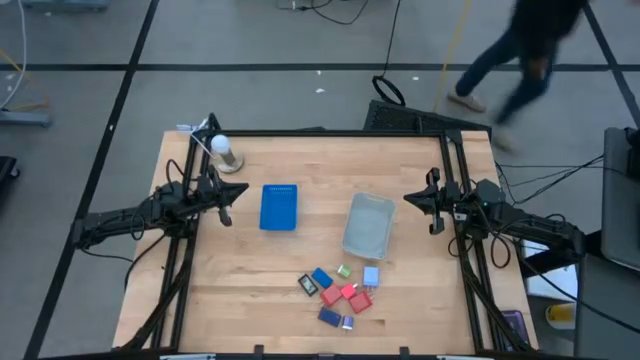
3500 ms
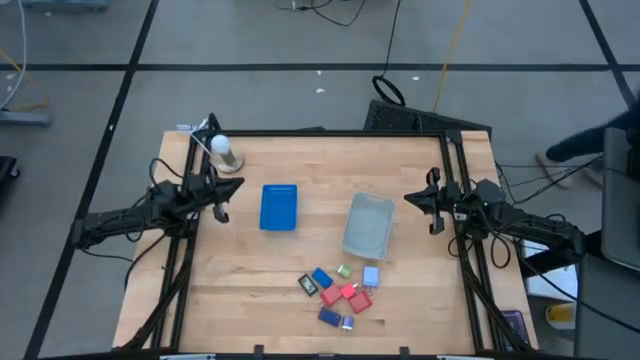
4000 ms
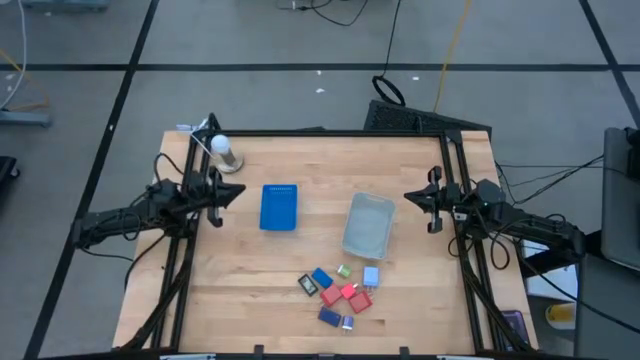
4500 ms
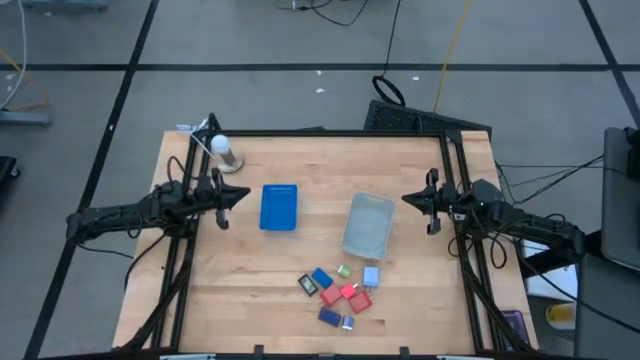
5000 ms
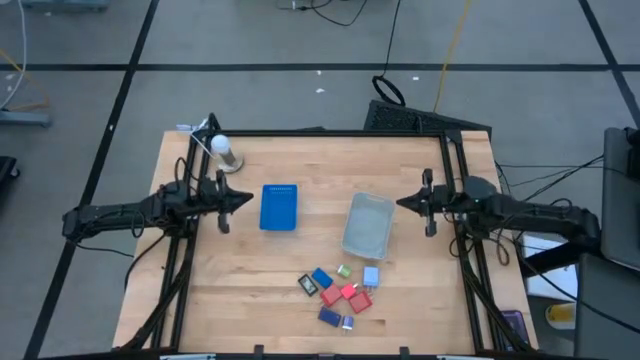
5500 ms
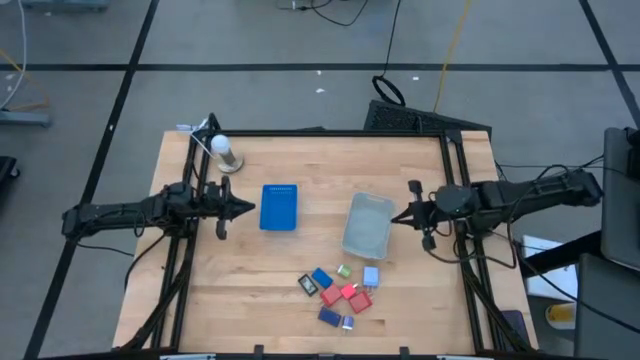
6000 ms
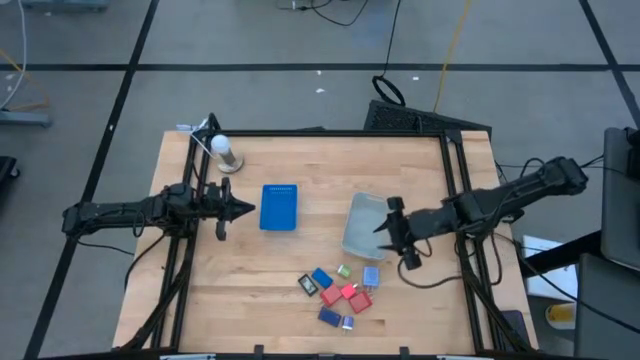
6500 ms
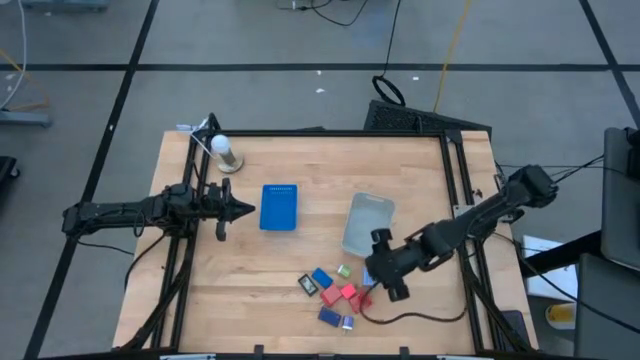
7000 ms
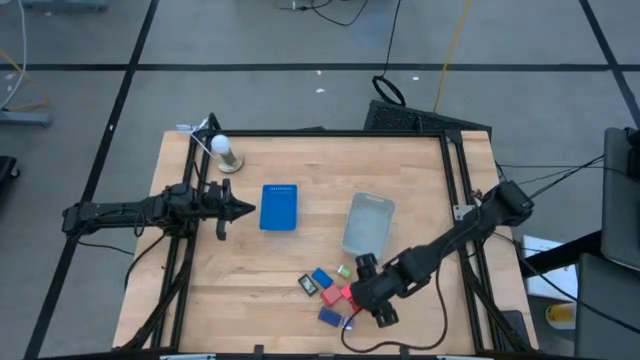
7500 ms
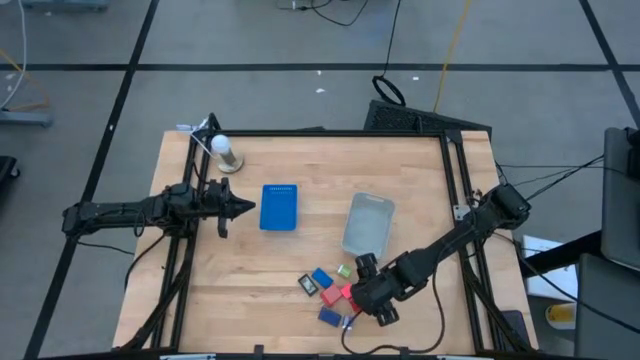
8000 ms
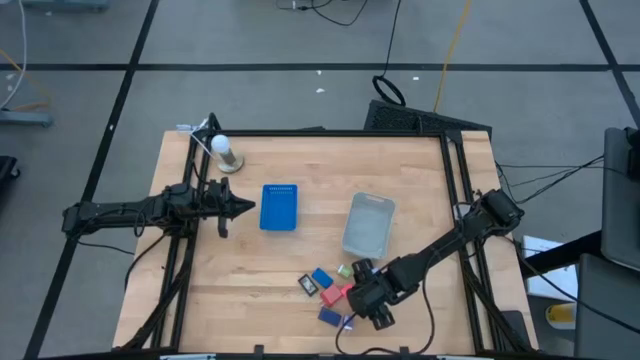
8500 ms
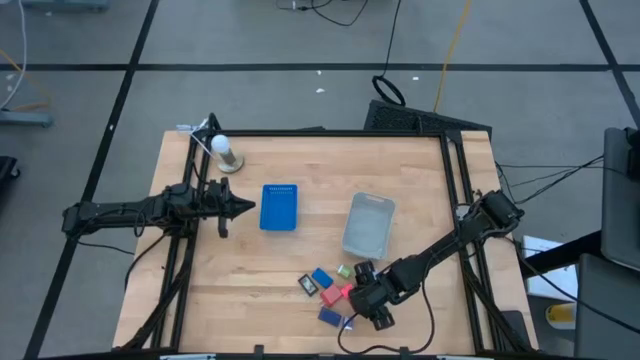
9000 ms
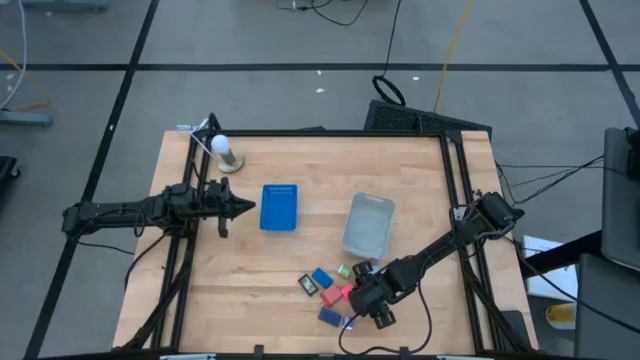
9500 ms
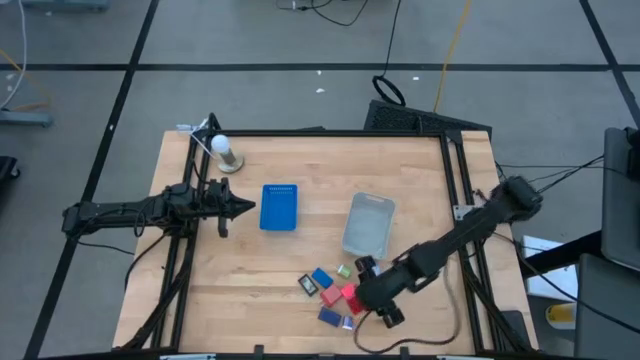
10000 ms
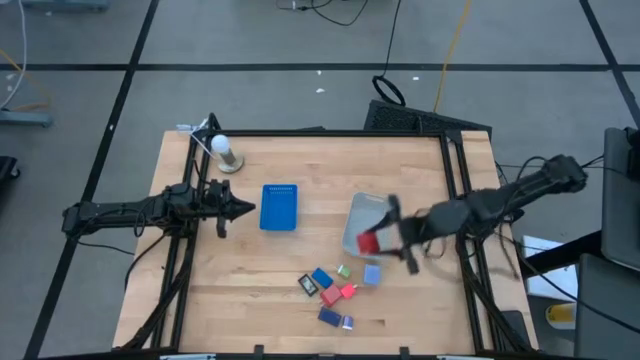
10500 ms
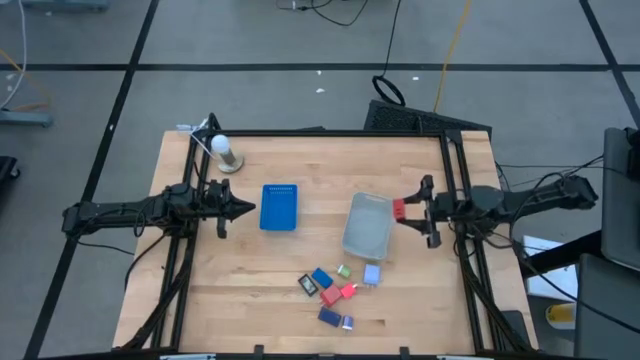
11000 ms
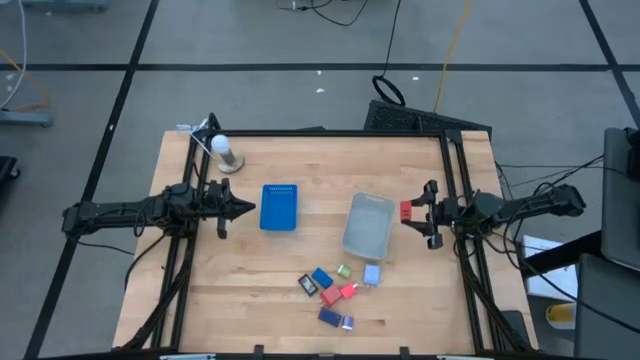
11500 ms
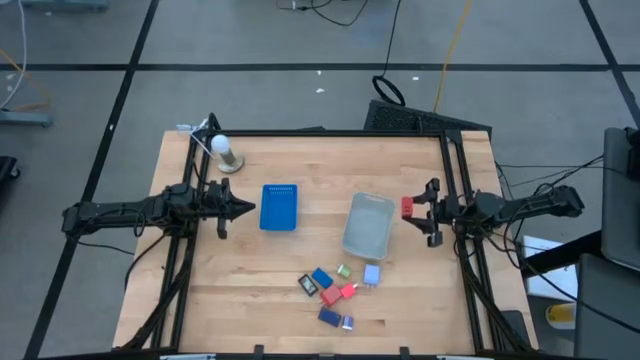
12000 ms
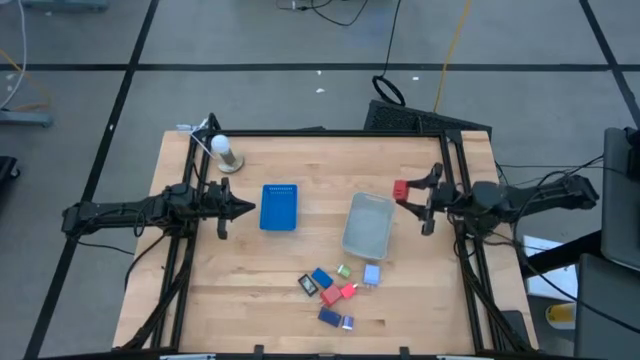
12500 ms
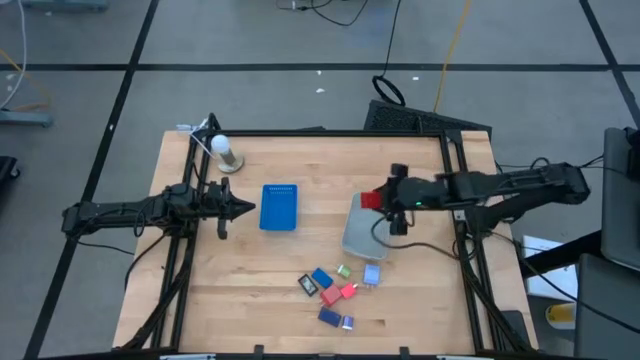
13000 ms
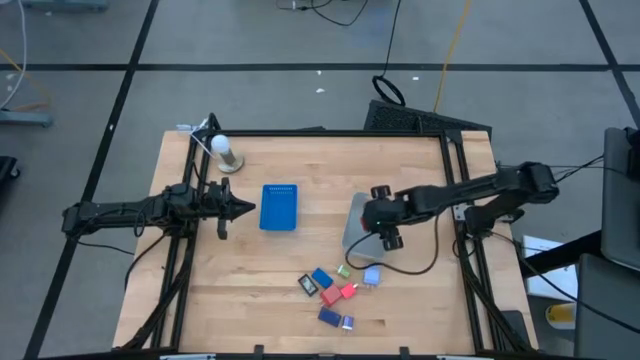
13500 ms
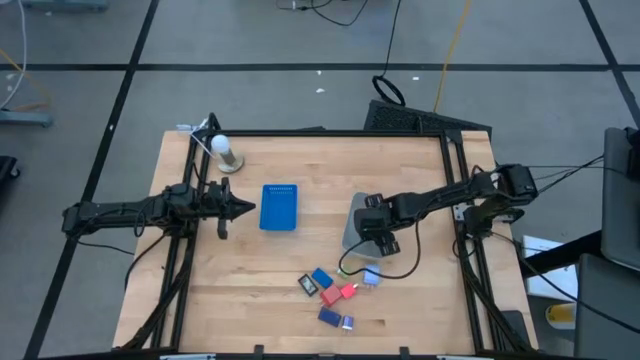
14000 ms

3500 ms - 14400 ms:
Task: Pick & Place Office items
Put the red charger adapter into the gray bin

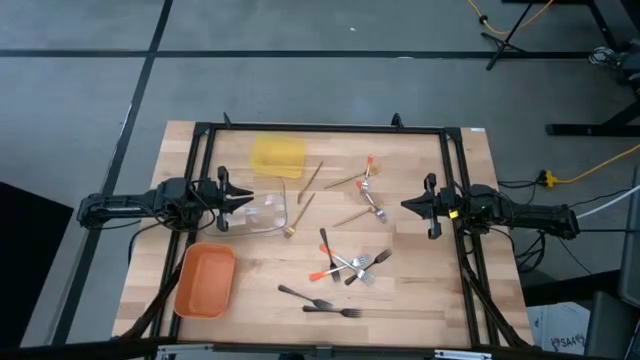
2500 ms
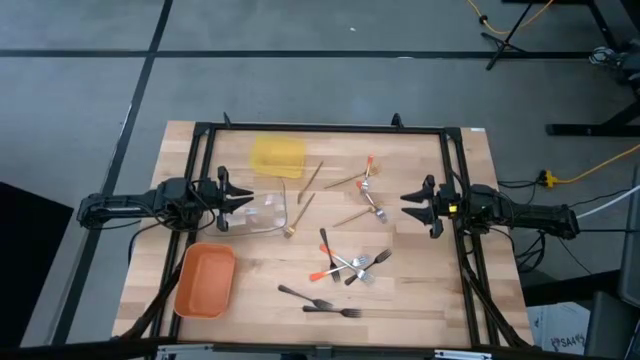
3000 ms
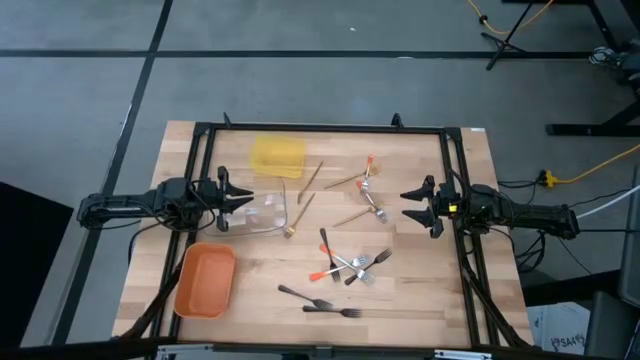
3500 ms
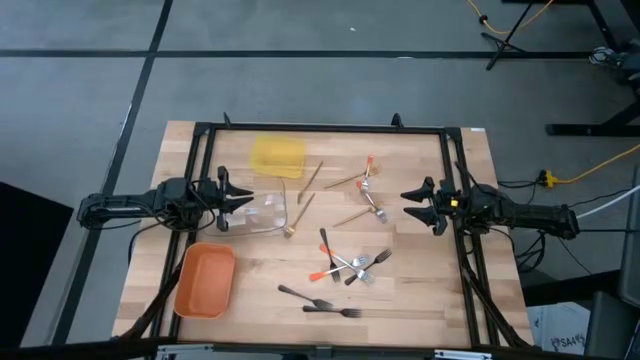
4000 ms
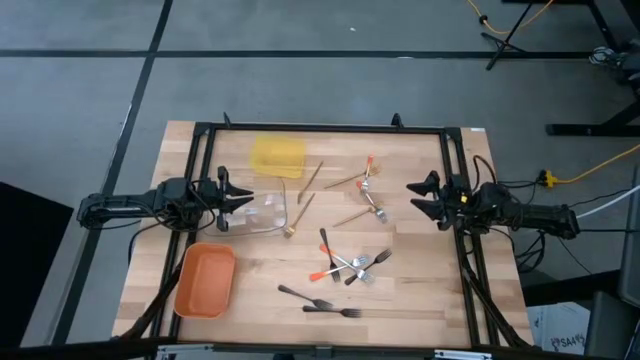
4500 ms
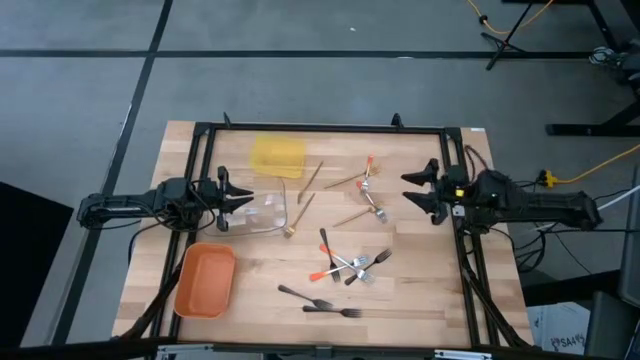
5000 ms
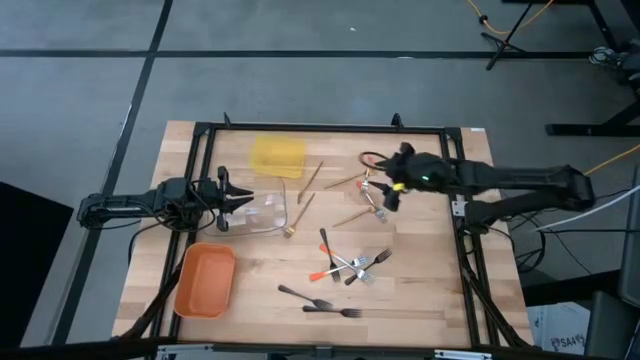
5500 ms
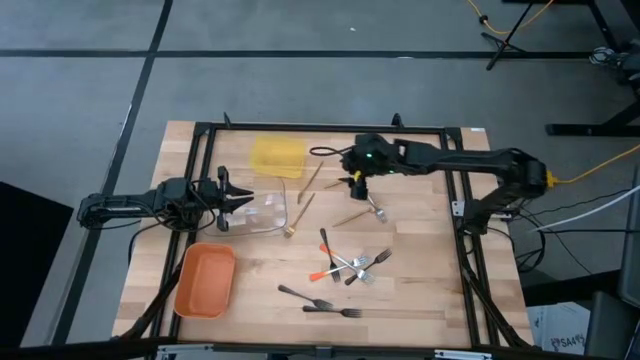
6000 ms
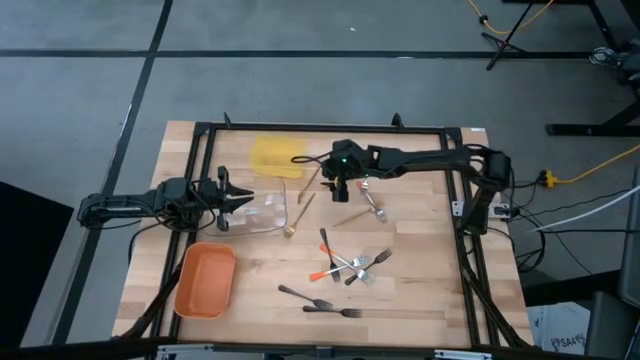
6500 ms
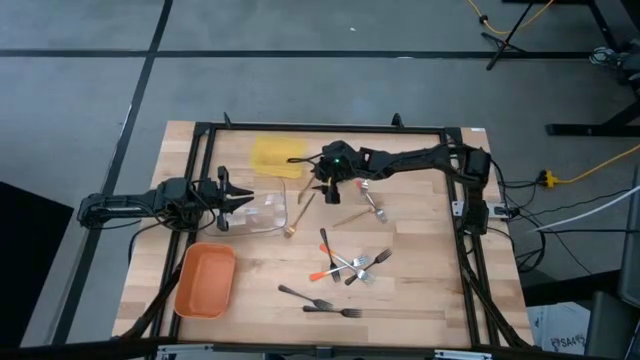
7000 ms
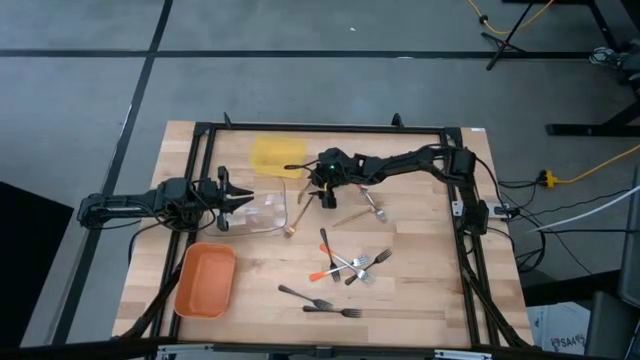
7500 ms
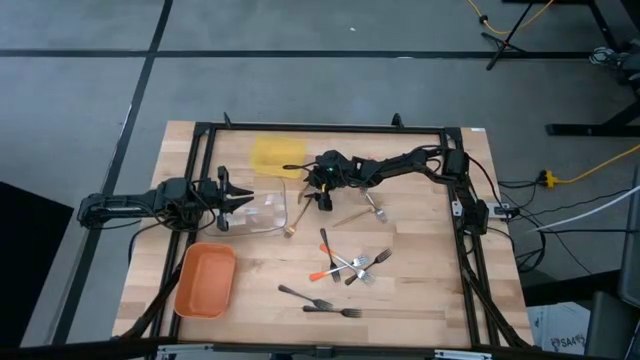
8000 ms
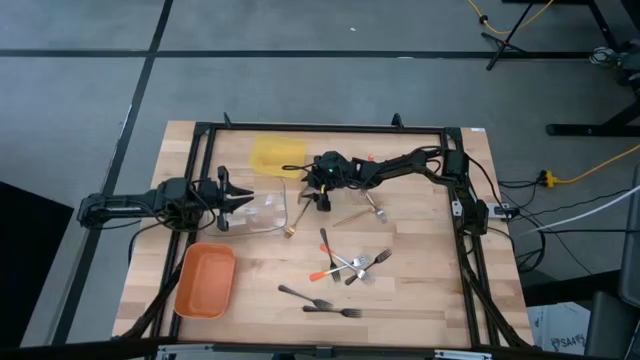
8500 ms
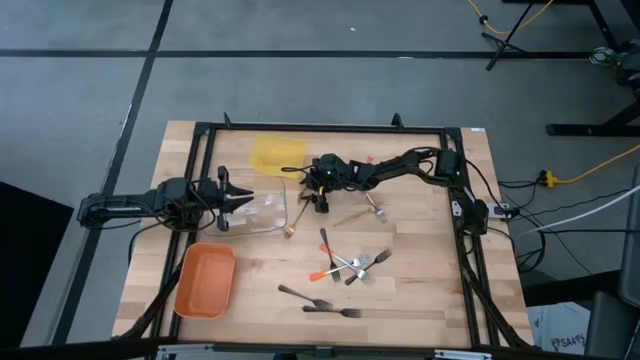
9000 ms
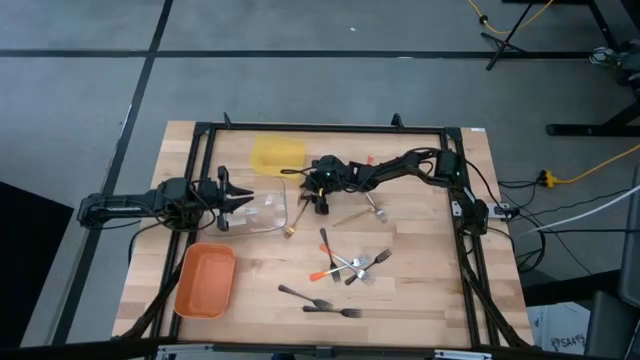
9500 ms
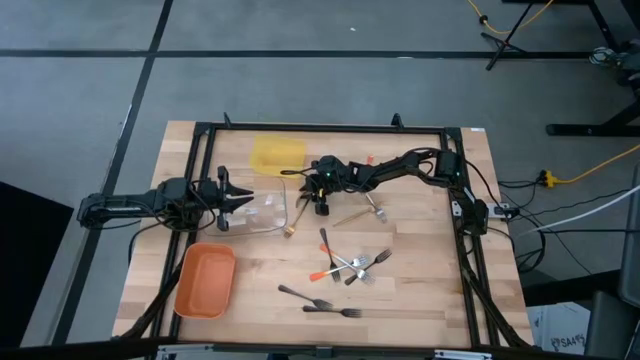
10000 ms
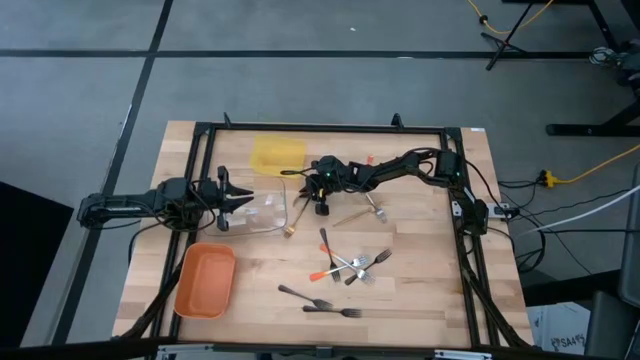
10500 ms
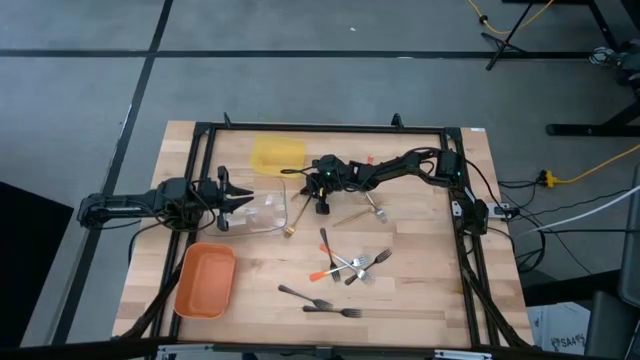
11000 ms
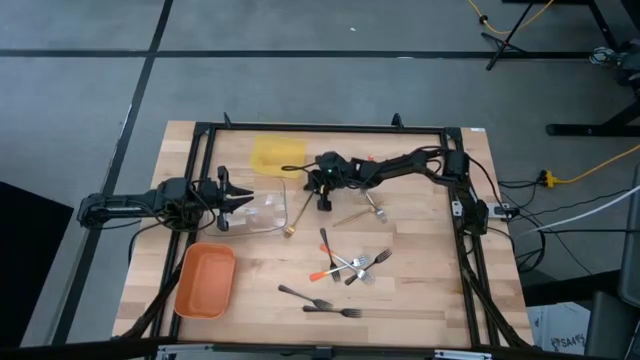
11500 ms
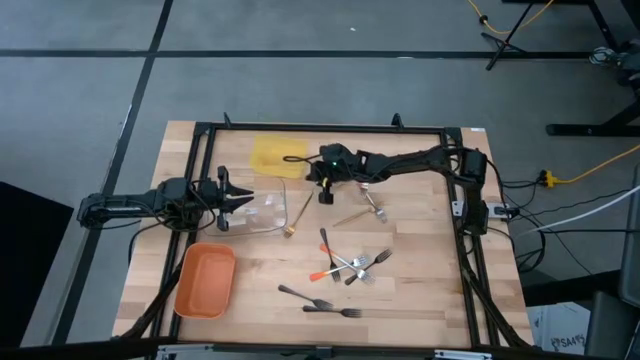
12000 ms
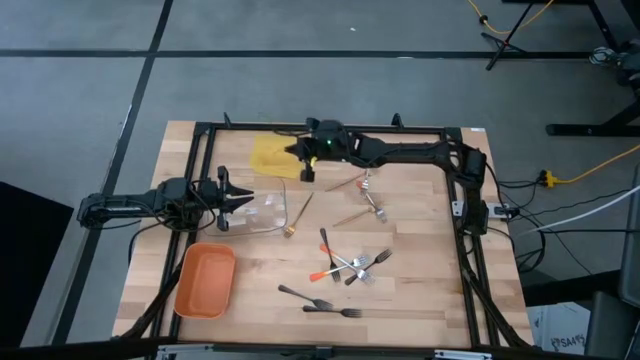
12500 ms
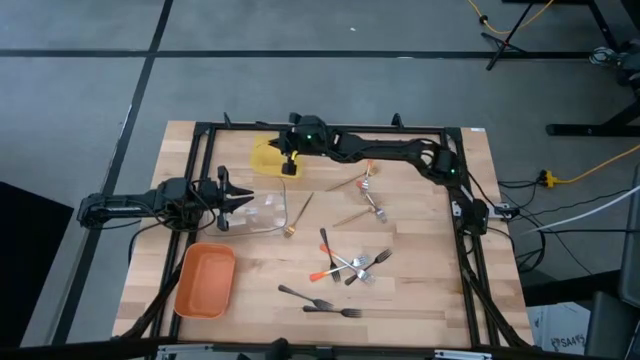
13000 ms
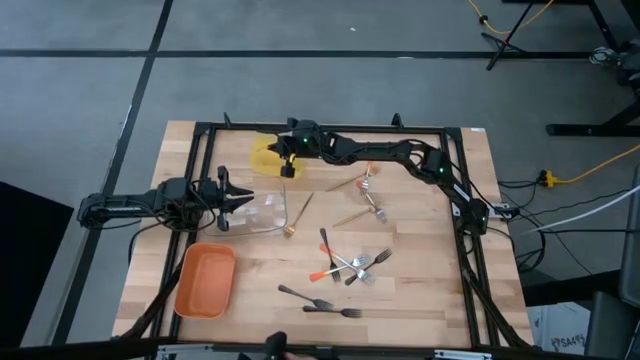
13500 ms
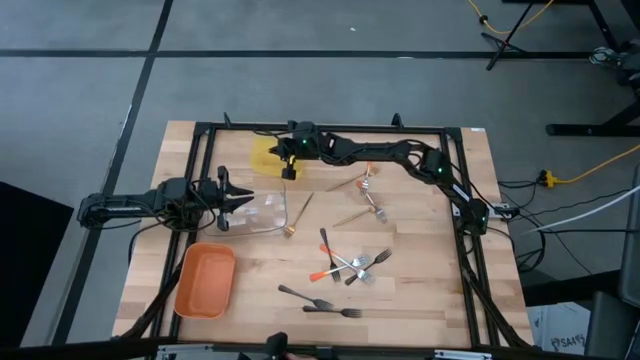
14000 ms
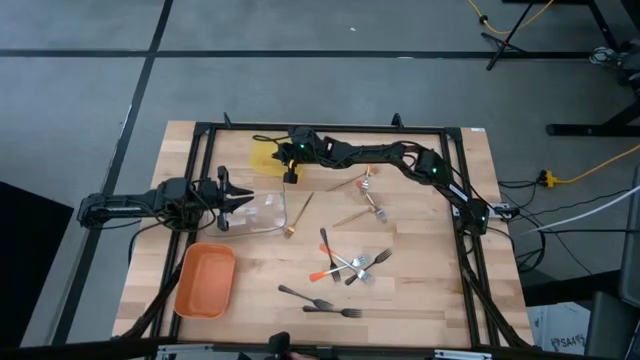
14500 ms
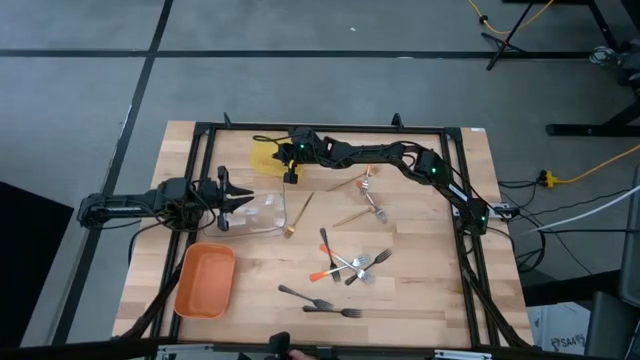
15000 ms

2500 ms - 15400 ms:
Task: Sort silverware by color (type)
Put the gold fork into the yellow bin
